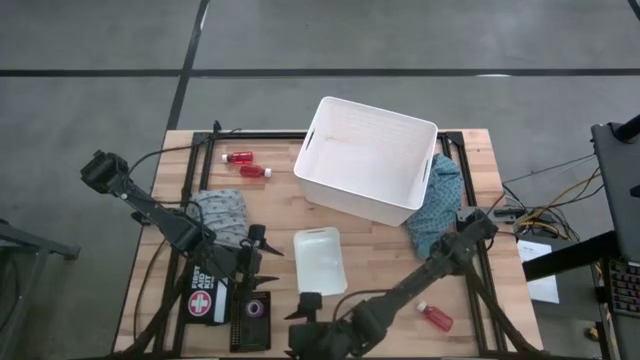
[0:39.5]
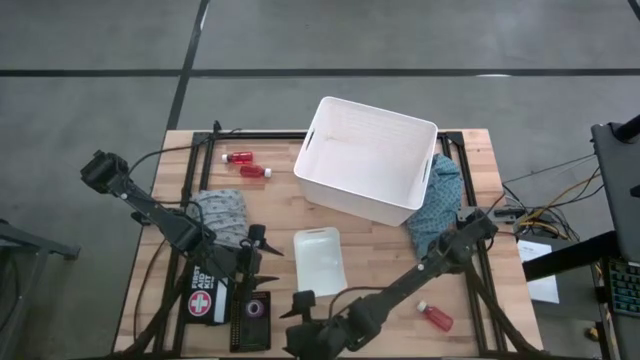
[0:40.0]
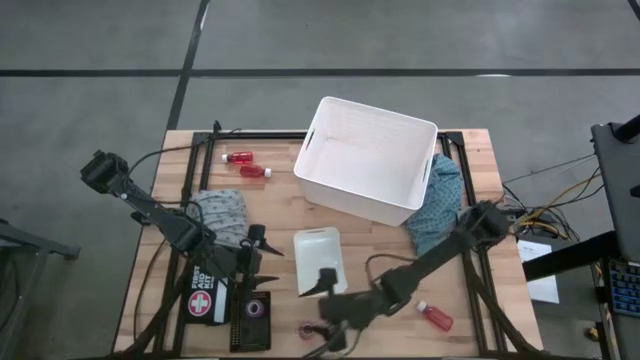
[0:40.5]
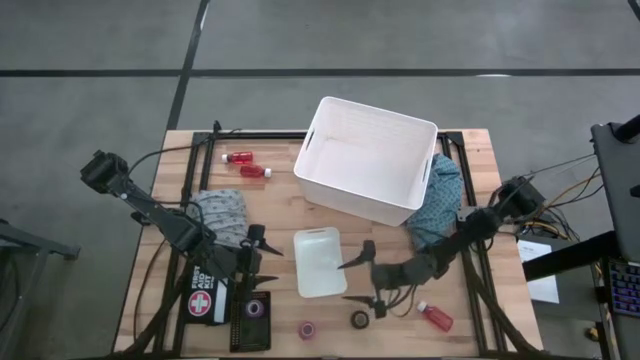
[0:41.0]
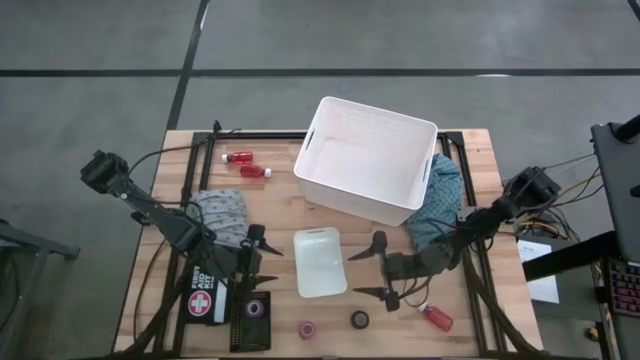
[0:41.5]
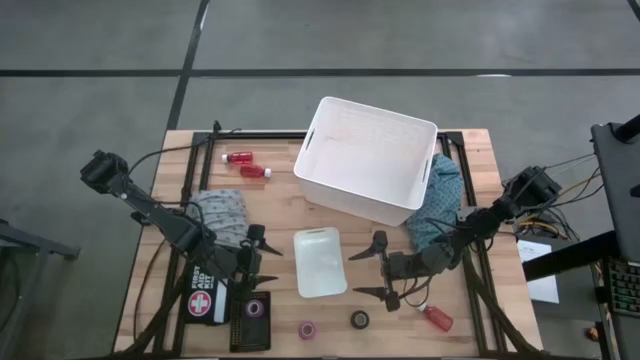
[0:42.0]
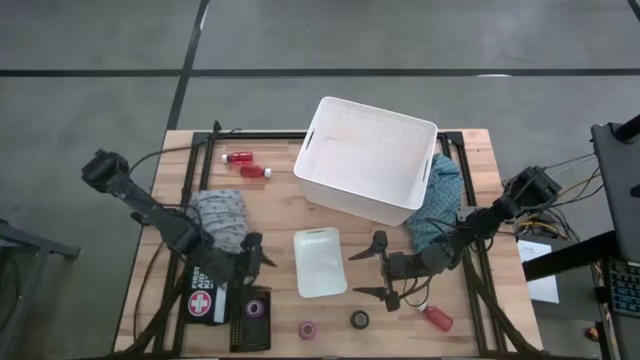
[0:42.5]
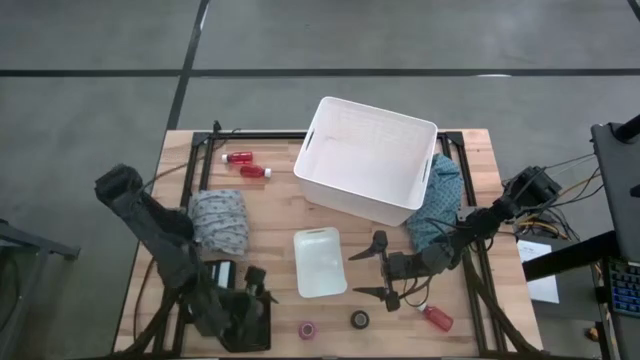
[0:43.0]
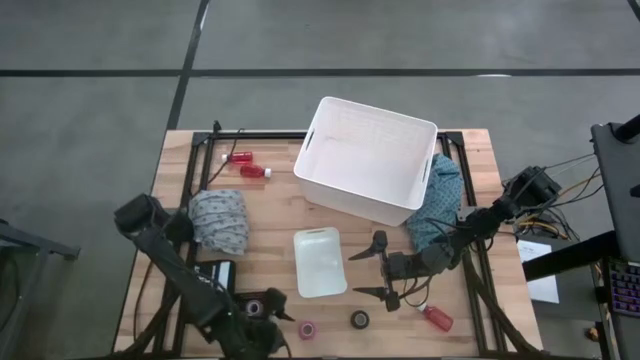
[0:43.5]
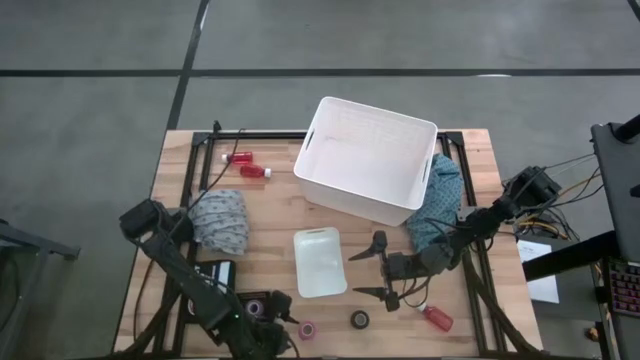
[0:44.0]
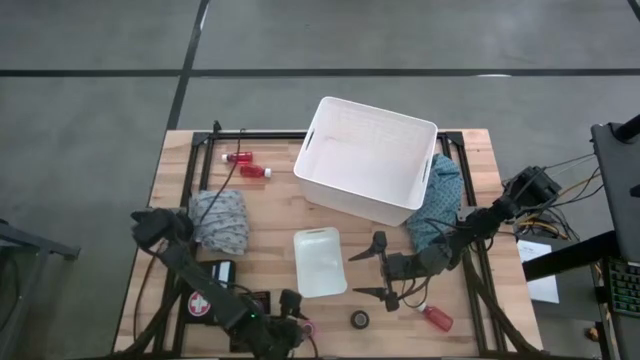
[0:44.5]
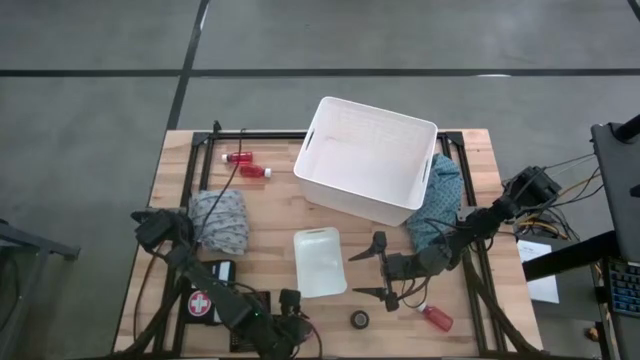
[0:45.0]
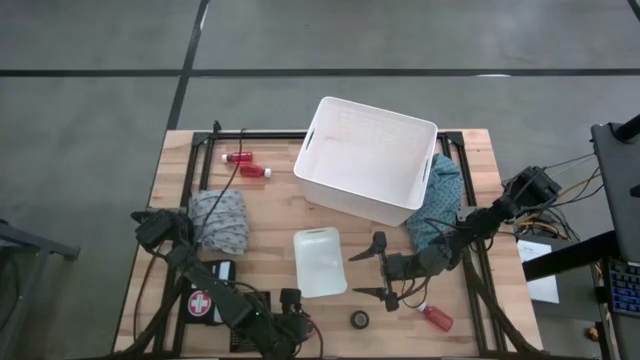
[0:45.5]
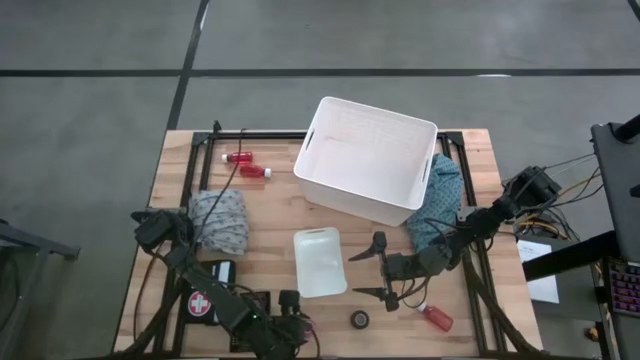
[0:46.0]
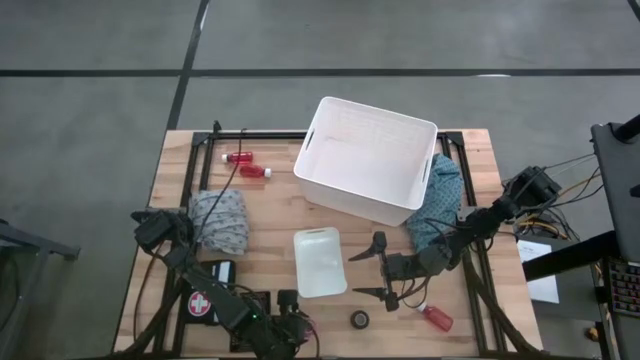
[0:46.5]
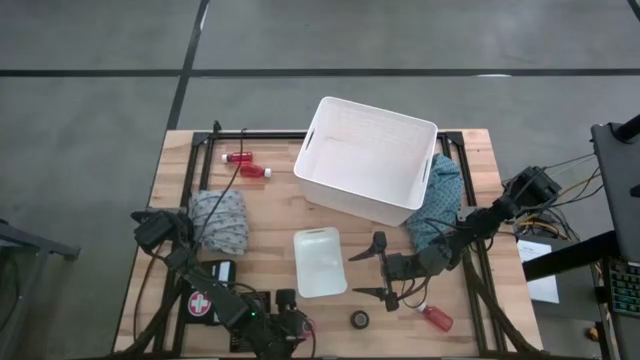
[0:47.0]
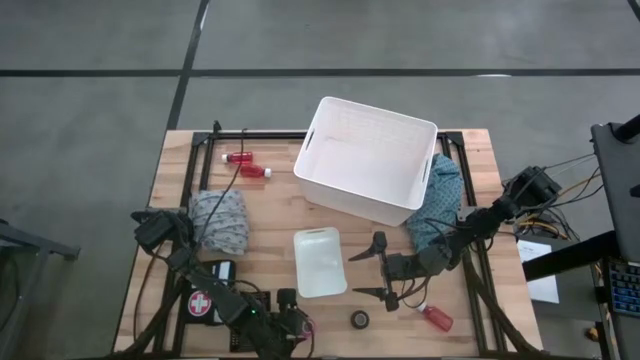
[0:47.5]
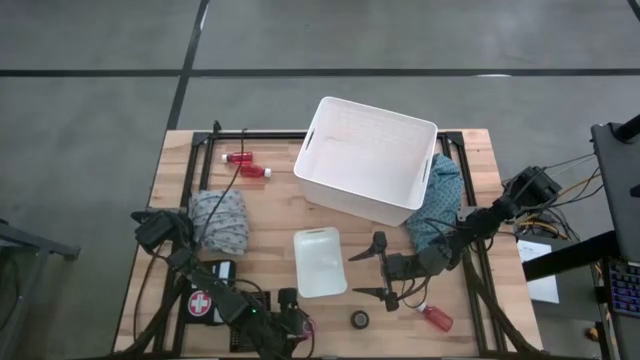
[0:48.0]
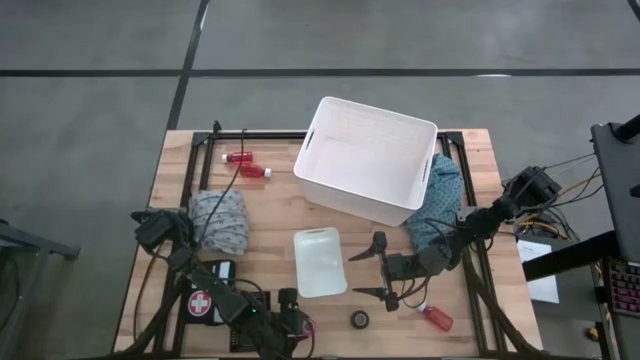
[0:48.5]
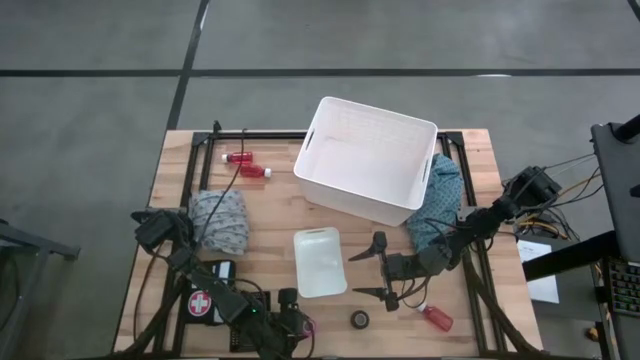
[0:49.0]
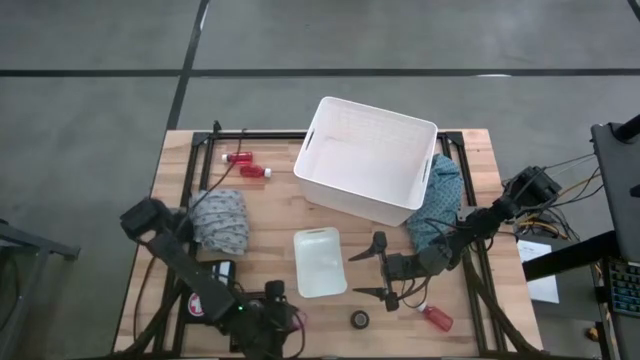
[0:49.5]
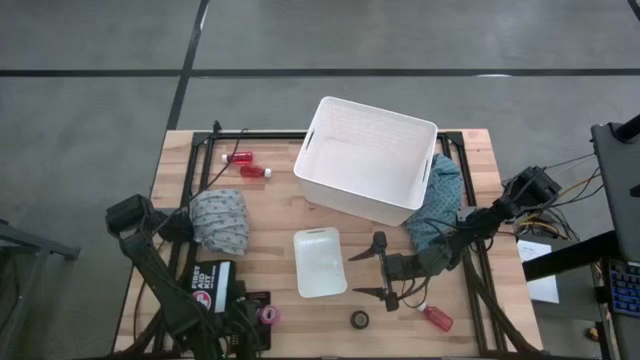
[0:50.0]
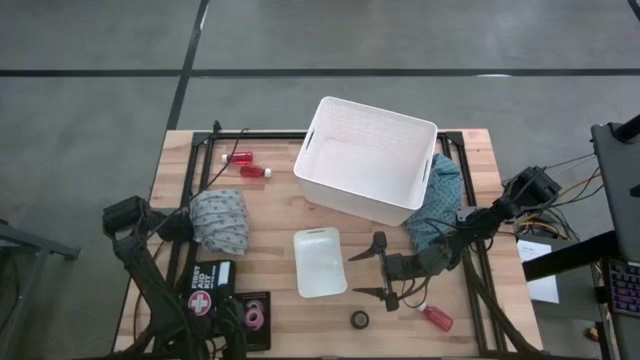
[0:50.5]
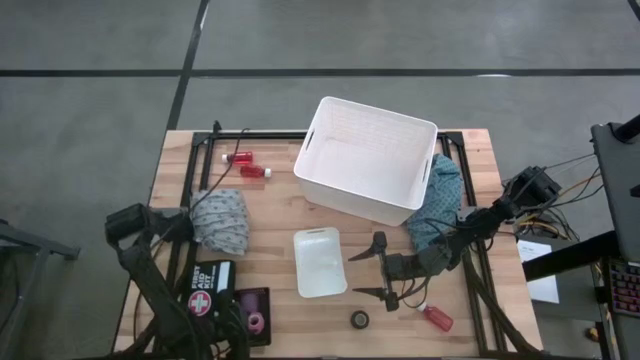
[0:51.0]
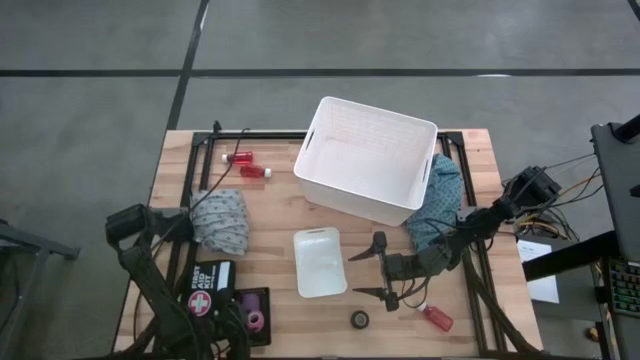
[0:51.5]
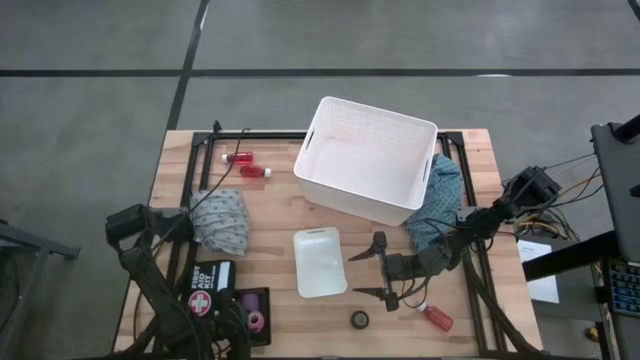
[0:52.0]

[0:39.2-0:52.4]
Task: Pick & Place Medicine items
Put the pink bandage into the black bin

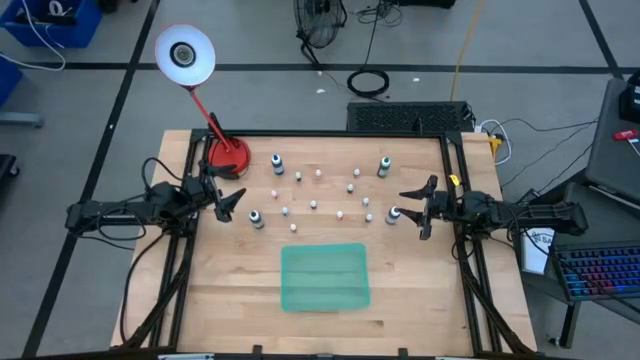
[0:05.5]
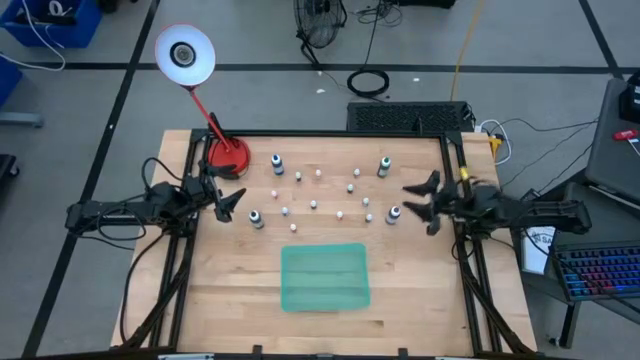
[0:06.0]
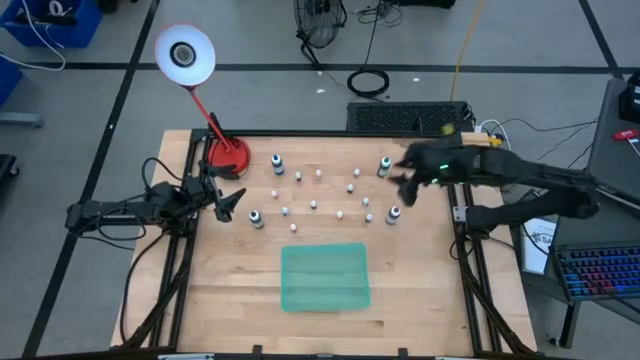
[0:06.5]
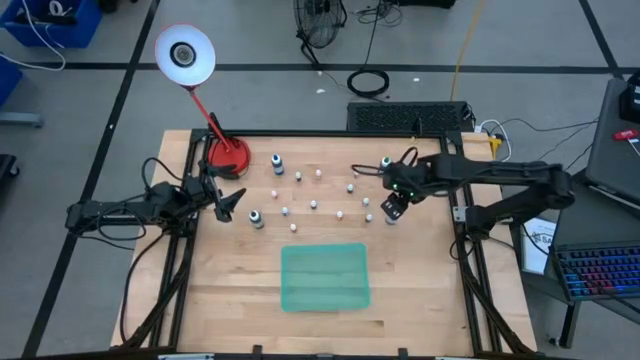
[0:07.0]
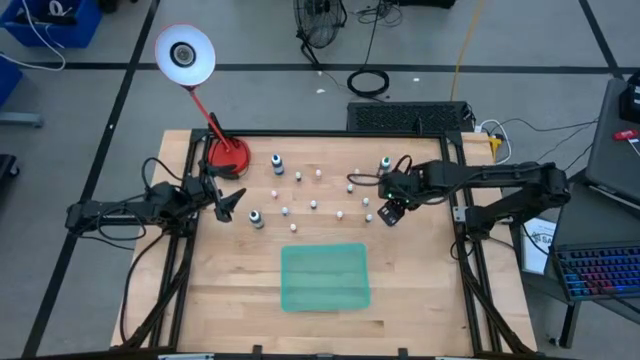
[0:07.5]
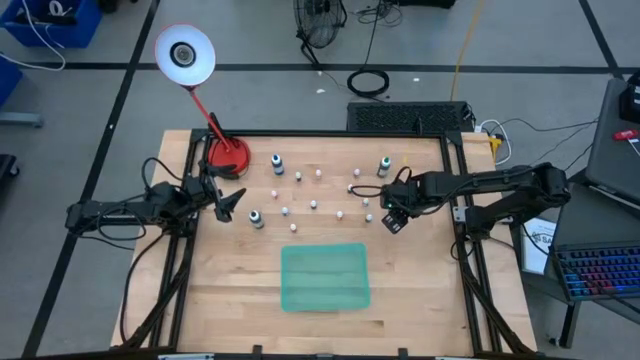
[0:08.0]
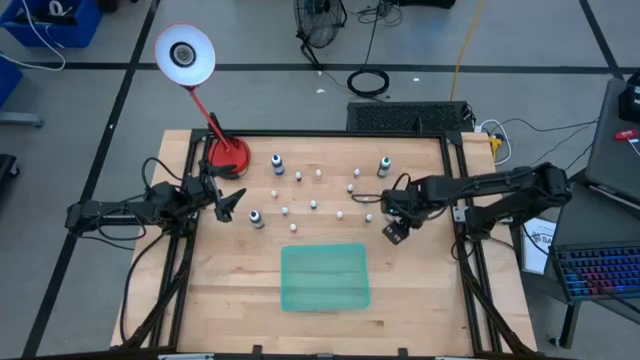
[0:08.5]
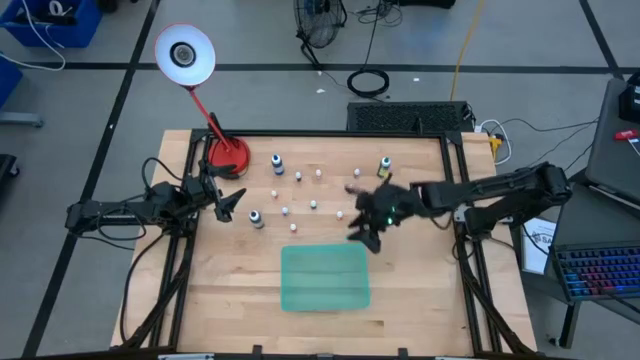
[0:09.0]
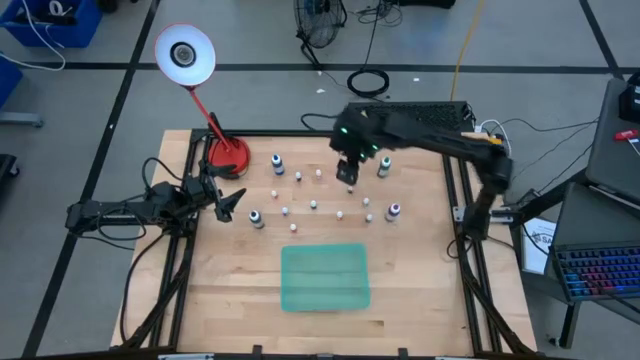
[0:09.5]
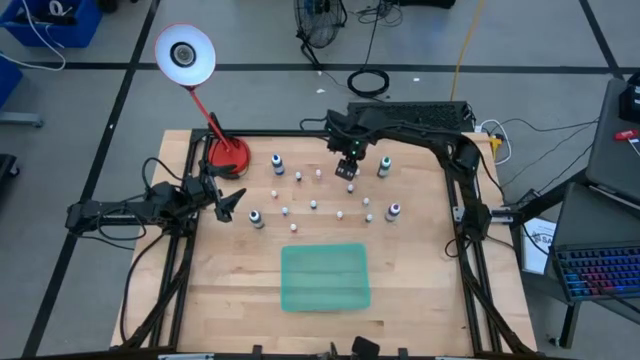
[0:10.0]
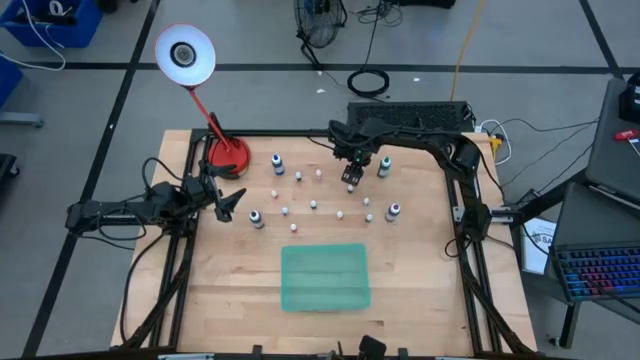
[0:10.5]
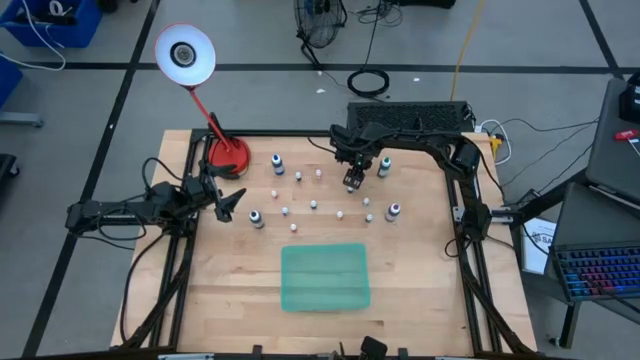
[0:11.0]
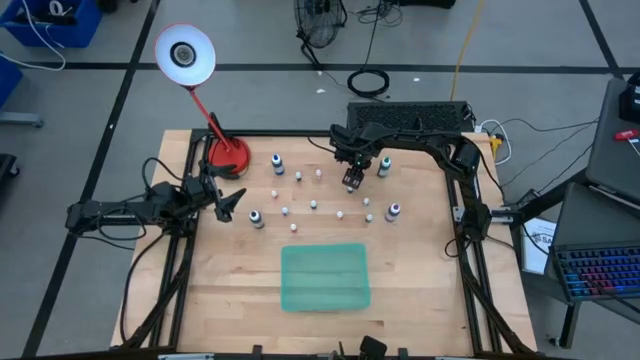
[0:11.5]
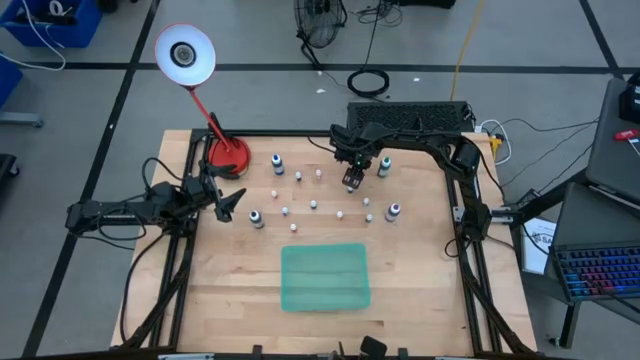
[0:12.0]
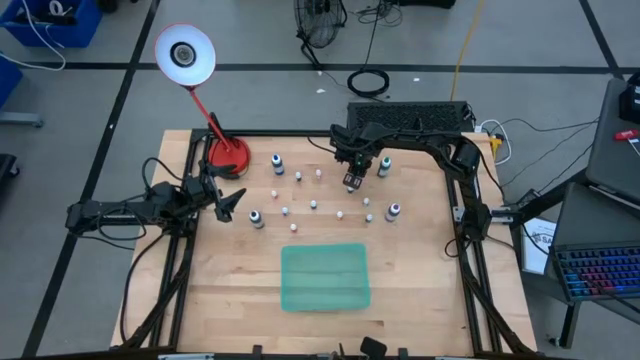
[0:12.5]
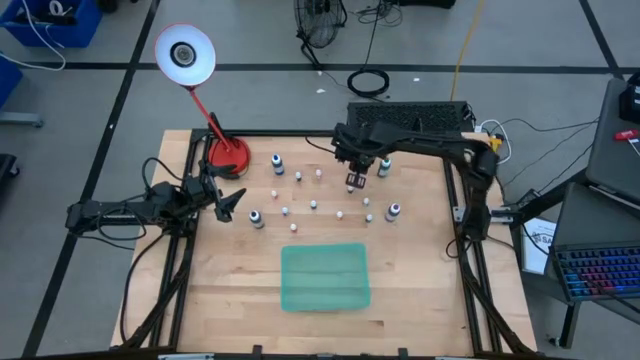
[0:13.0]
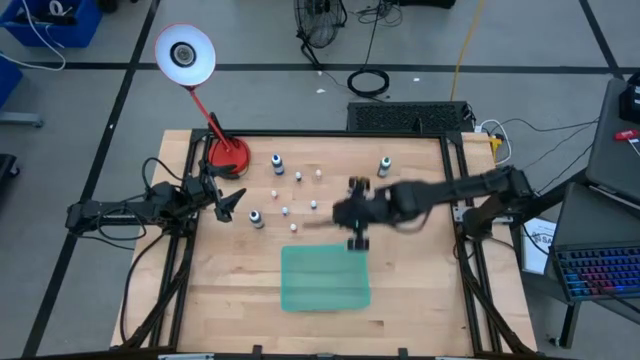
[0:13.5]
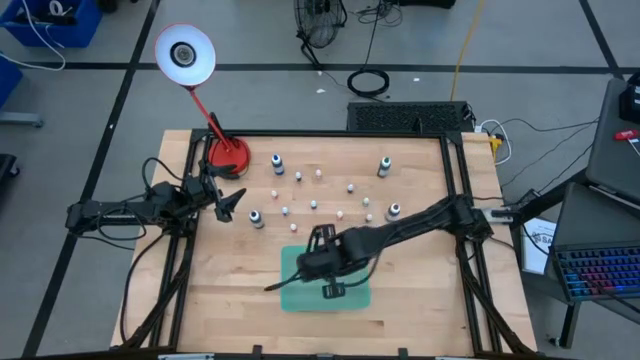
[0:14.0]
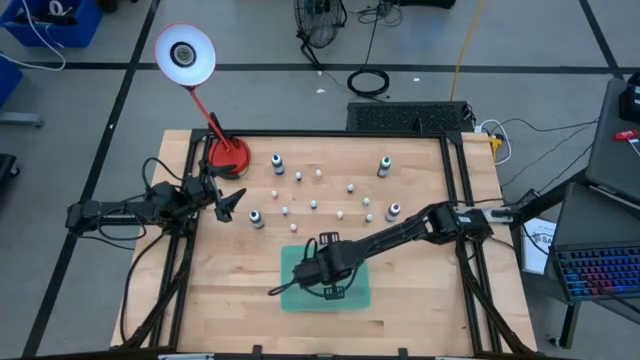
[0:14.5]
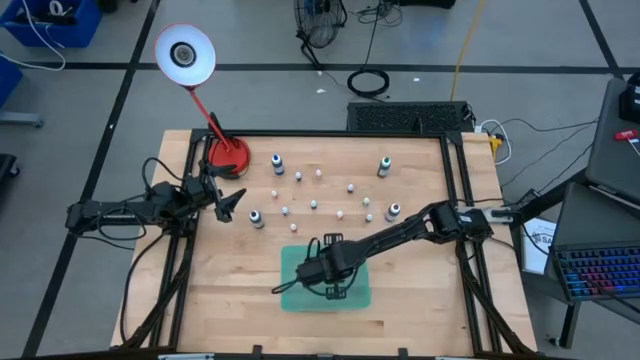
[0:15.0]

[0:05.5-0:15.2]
Task: Pick & Place food coloring
Put the small orange food coloring bottle into the blue bin
